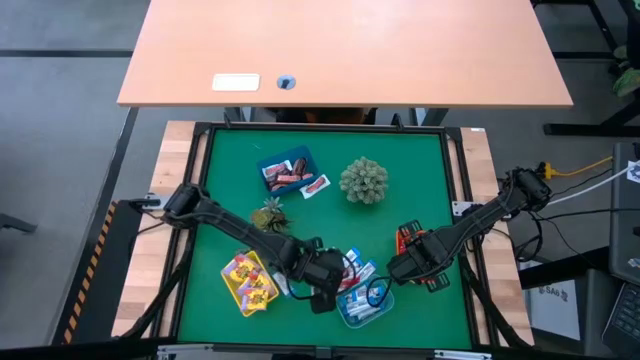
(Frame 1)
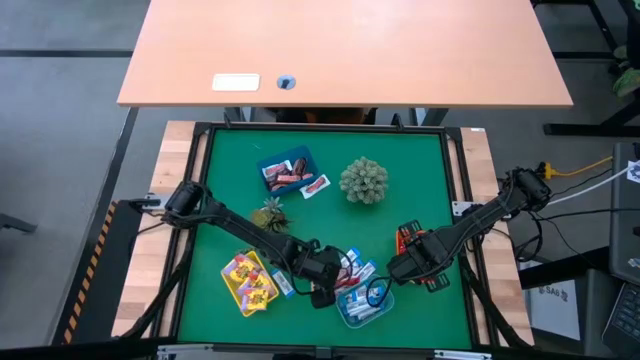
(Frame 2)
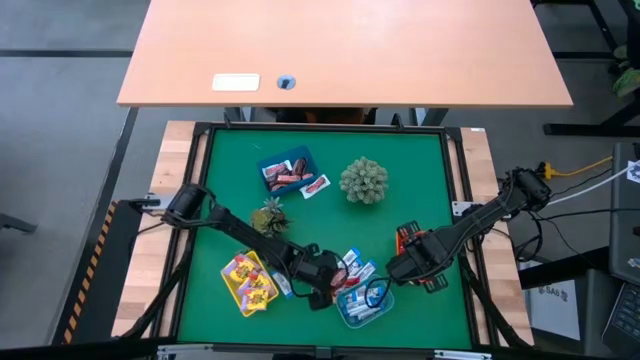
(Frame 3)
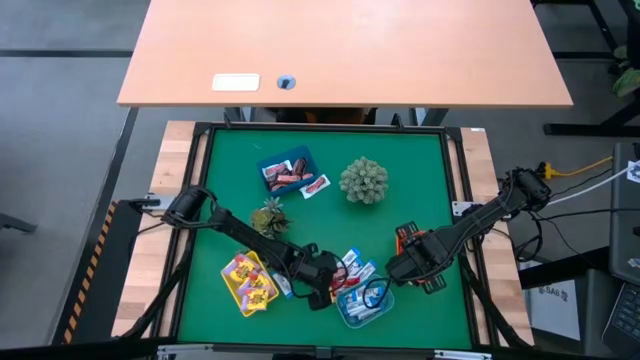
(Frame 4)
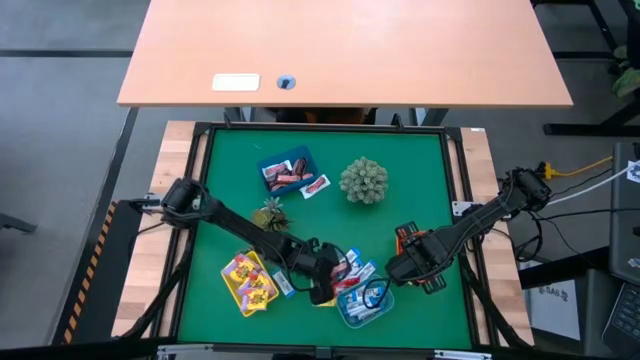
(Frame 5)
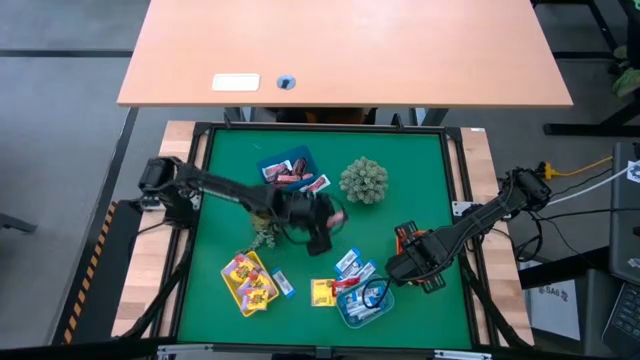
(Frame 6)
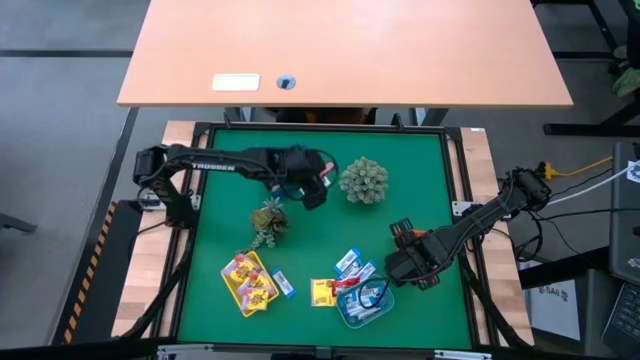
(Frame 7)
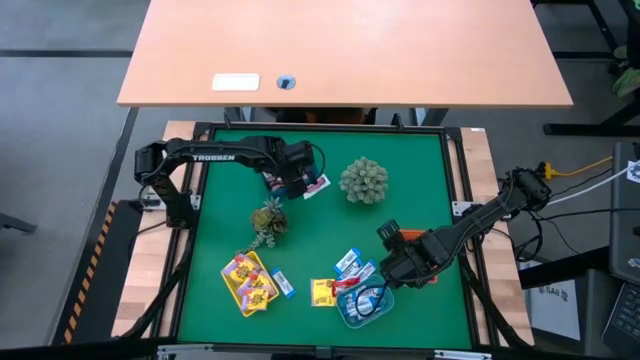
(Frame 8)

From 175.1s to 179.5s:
Task: Sort candy
Put the brown chocolate into the blue bin

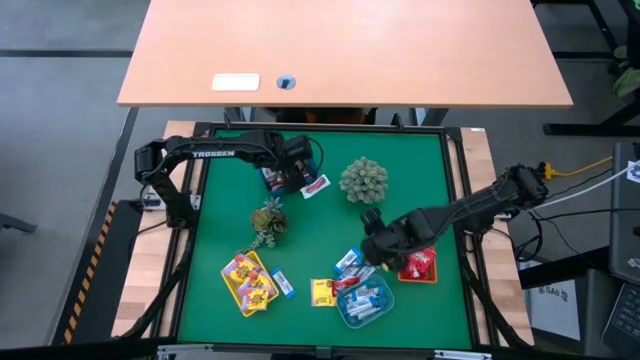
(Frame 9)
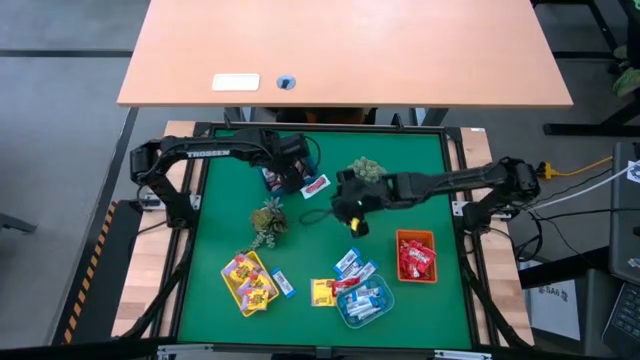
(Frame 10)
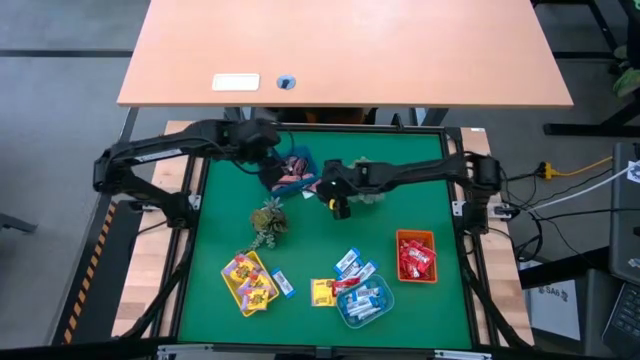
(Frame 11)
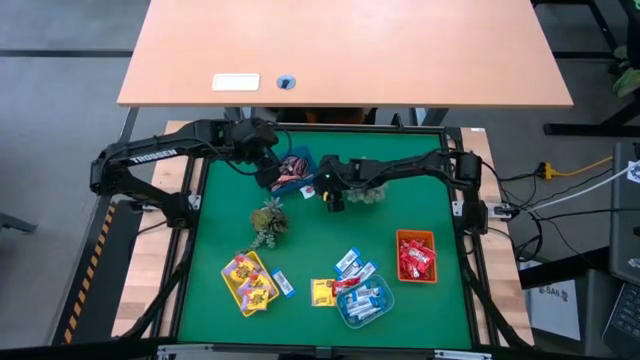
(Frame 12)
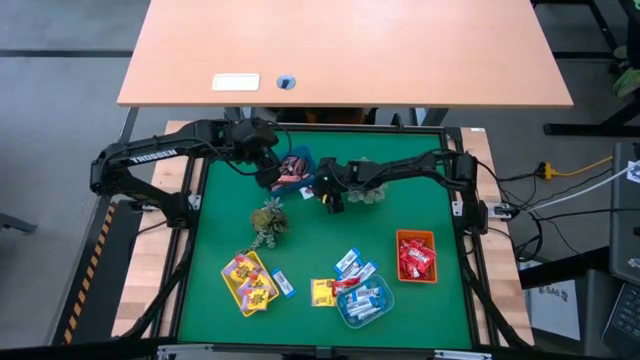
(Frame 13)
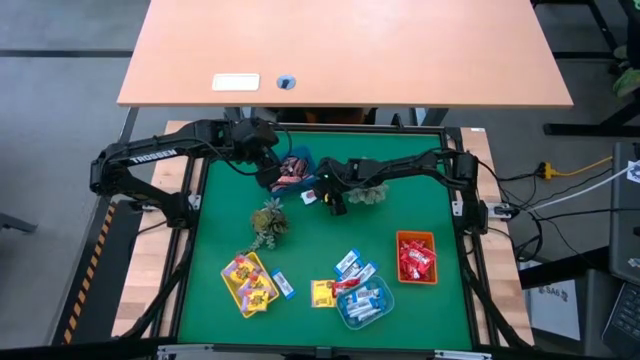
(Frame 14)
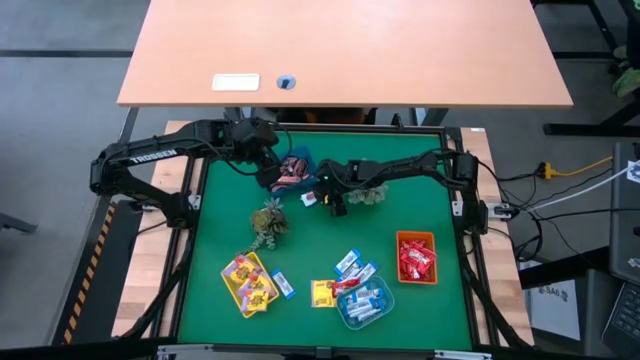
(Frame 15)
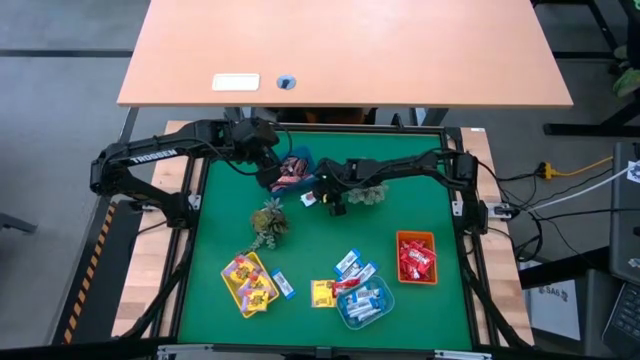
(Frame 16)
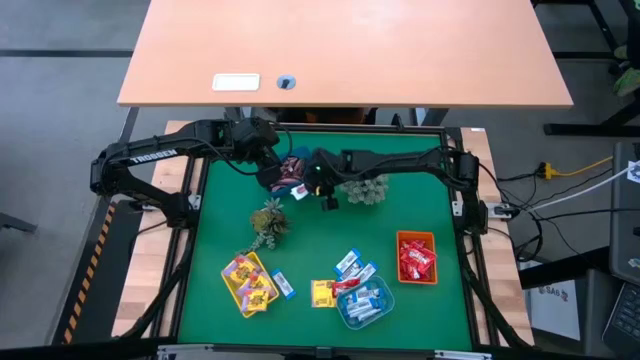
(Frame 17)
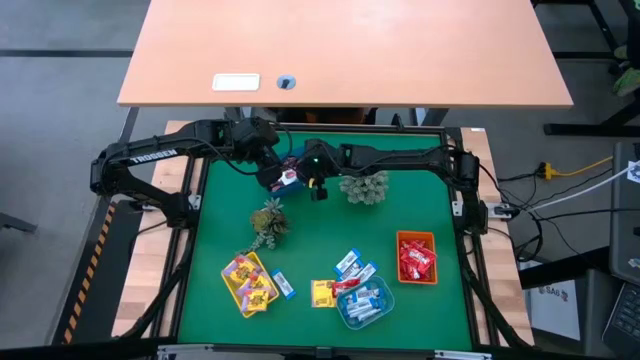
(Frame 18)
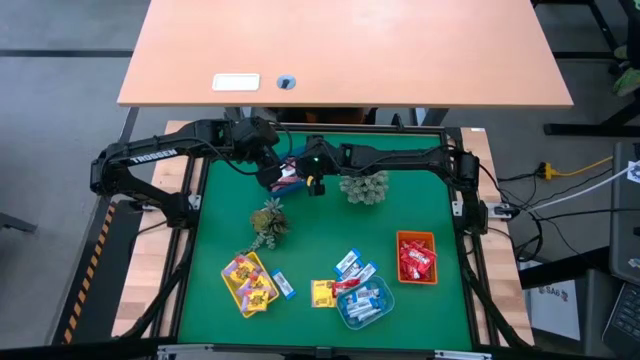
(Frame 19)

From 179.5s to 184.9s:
Put the white chocolate bar into the blue bin

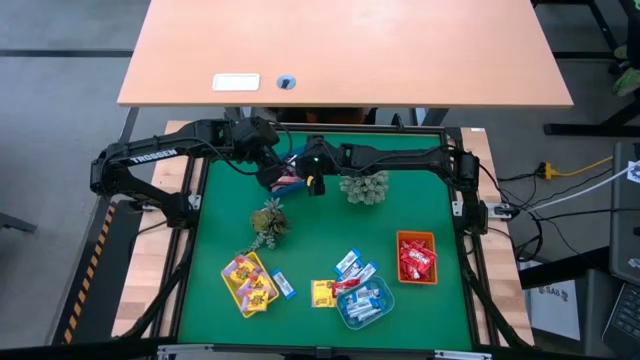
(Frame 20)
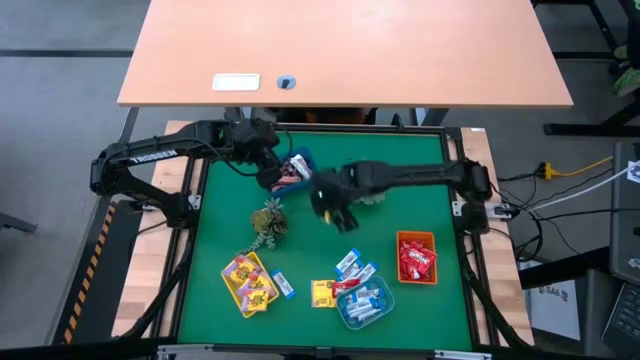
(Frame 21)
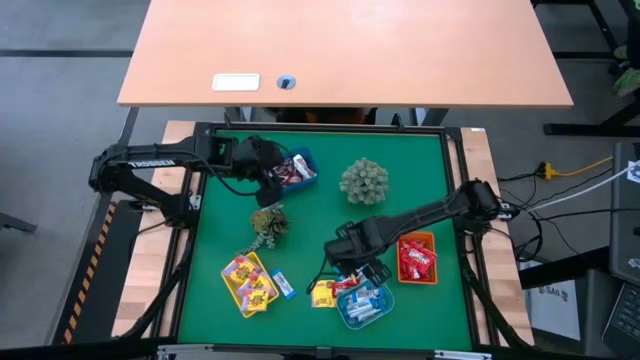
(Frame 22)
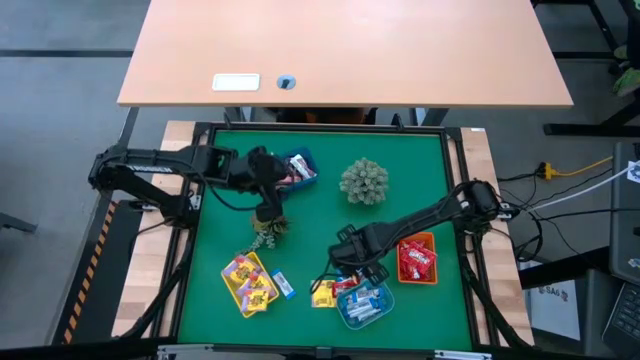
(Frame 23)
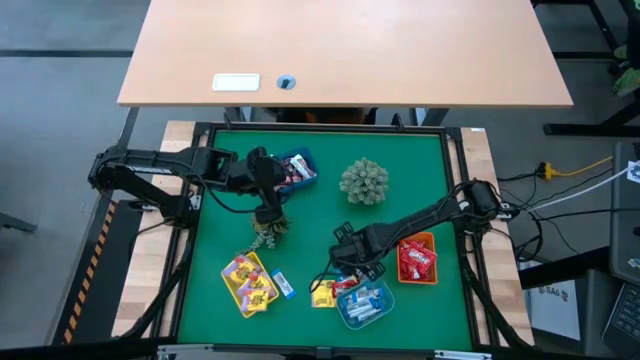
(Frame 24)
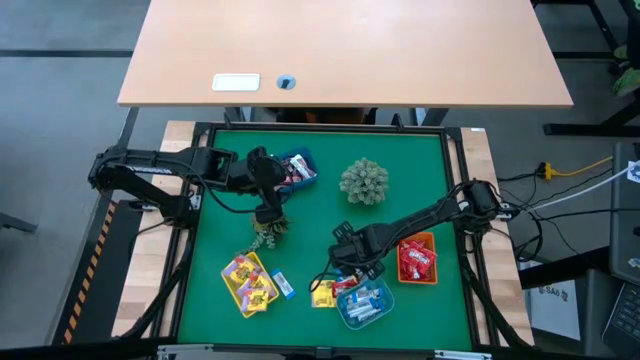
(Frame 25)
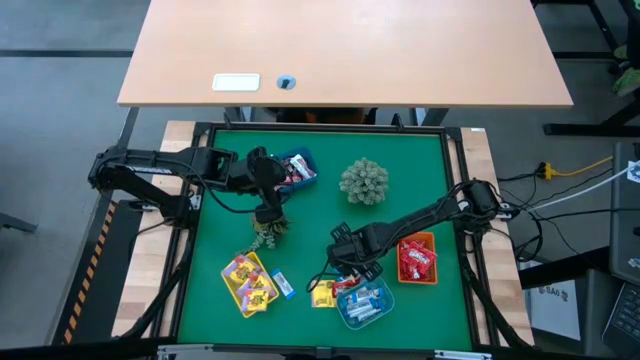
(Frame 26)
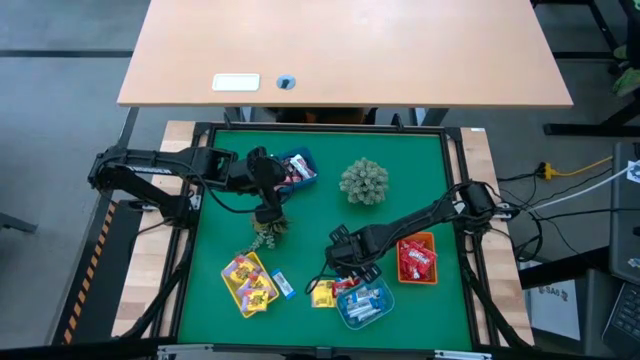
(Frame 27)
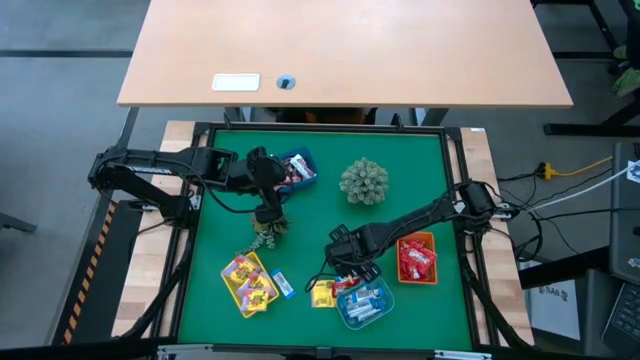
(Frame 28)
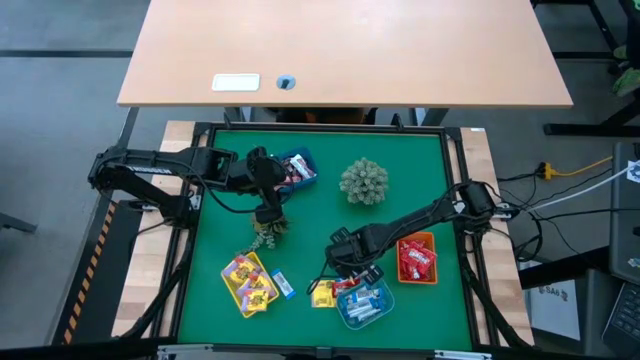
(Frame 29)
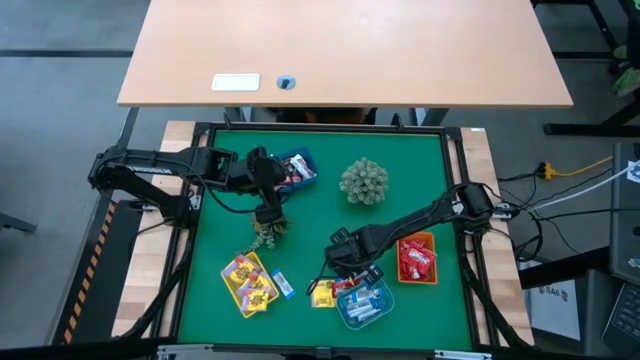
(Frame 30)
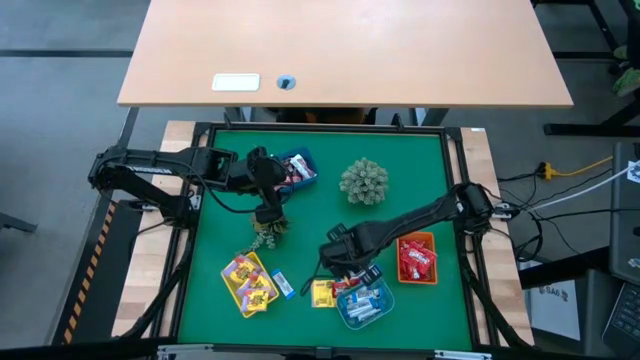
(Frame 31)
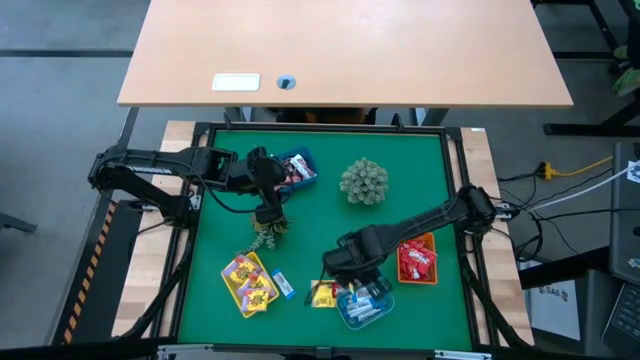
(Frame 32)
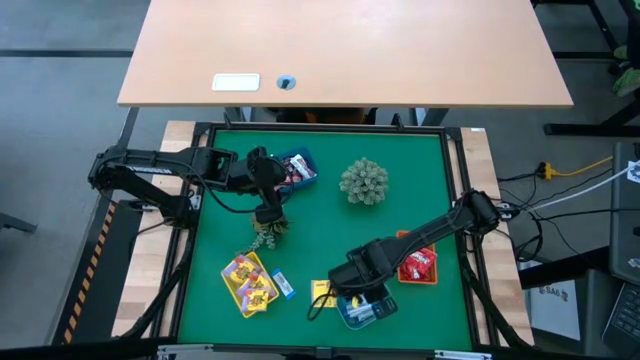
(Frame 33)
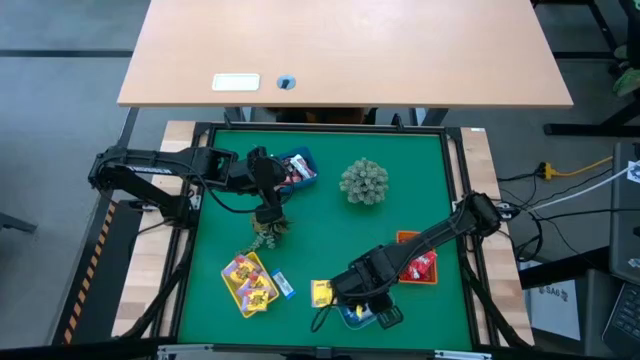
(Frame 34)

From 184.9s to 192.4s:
Put the white and blue chocolate bar into the blue bin

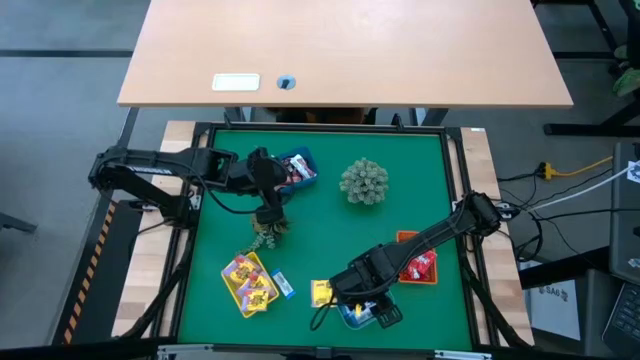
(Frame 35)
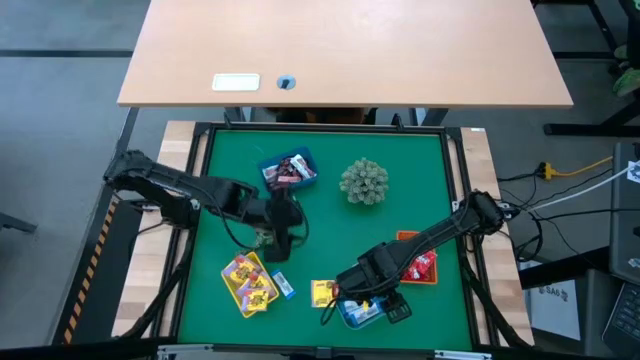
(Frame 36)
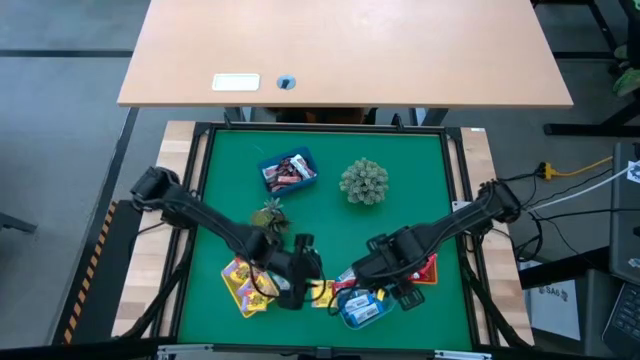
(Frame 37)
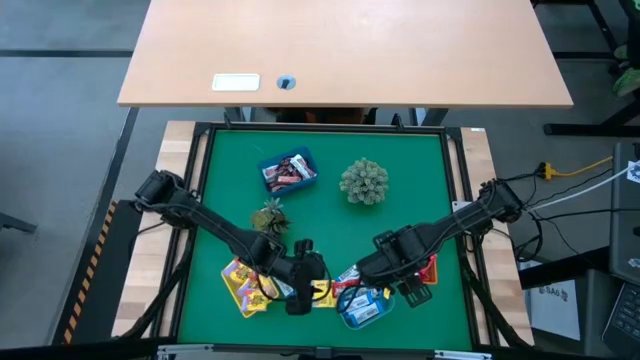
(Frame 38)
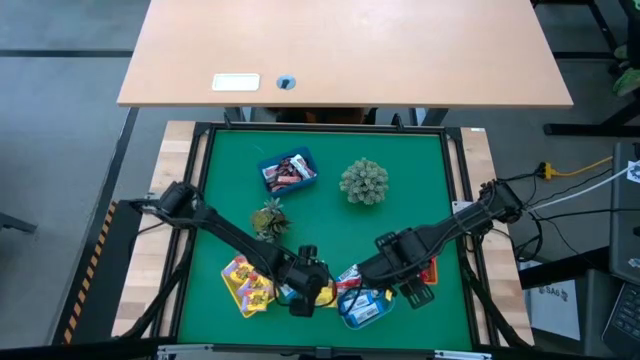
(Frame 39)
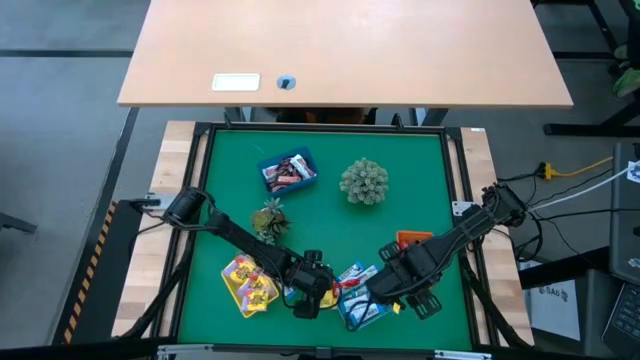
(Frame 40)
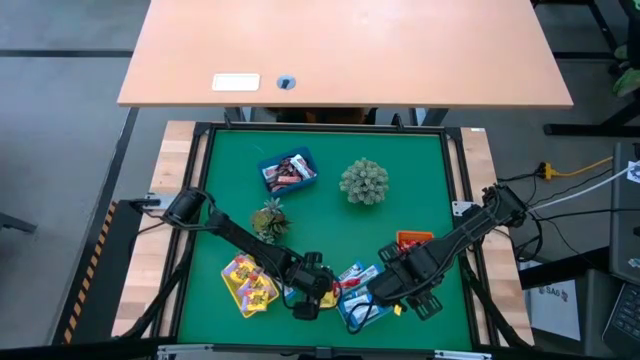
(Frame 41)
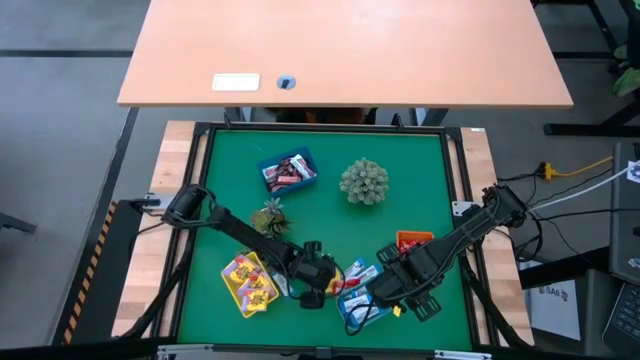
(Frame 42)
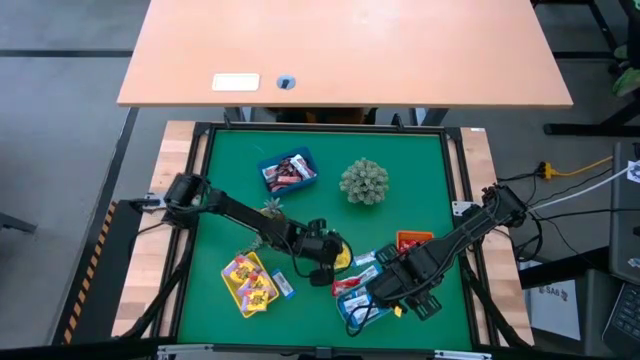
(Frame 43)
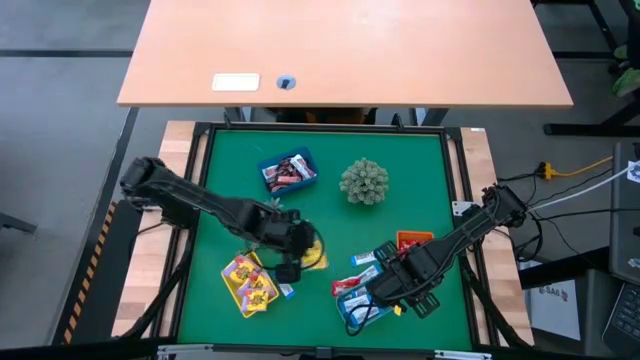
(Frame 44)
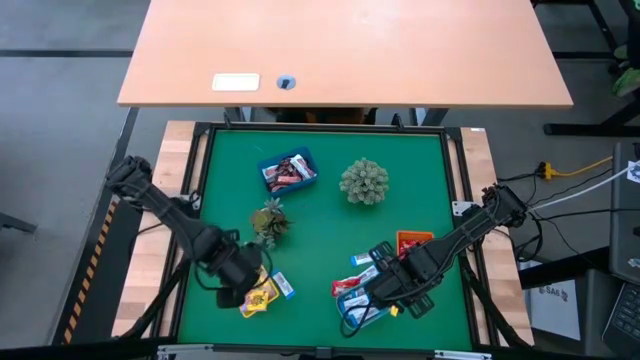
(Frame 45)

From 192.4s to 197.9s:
Put the yellow candy into the yellow bin
